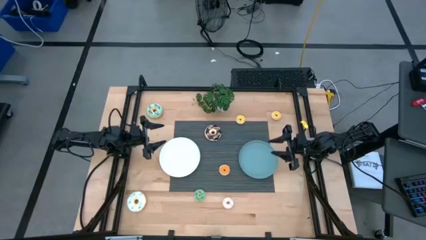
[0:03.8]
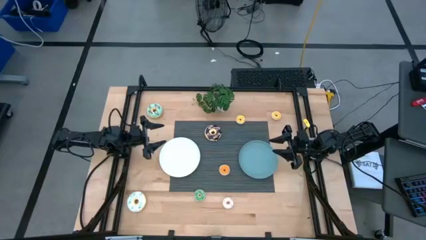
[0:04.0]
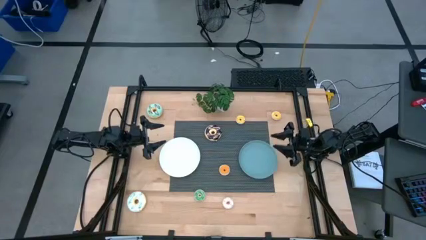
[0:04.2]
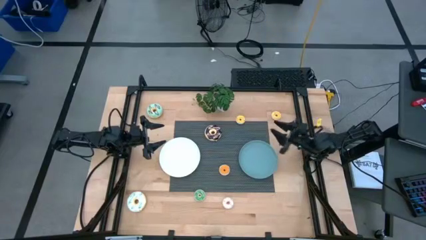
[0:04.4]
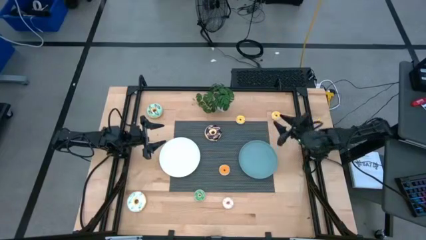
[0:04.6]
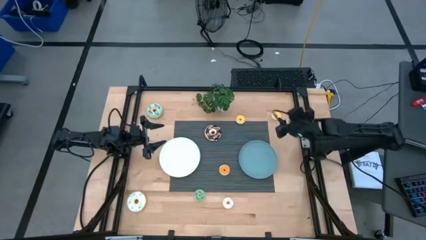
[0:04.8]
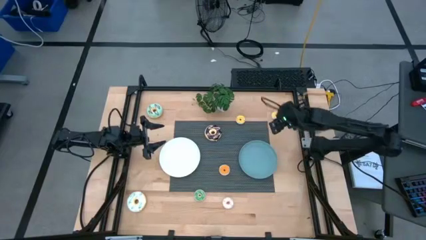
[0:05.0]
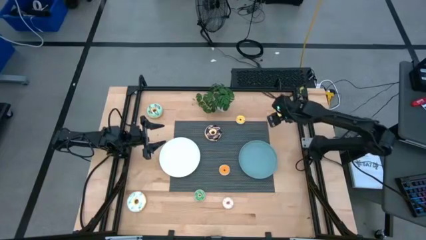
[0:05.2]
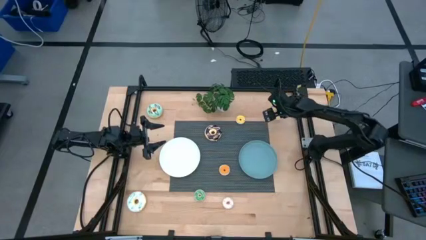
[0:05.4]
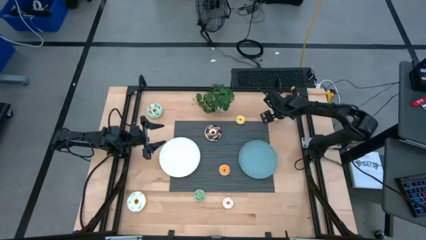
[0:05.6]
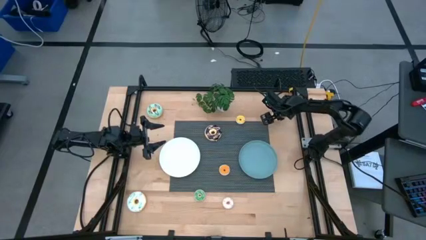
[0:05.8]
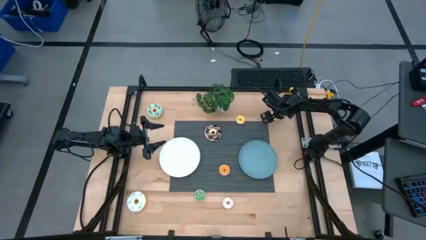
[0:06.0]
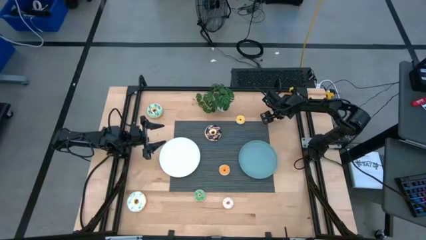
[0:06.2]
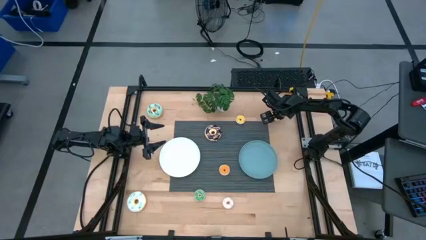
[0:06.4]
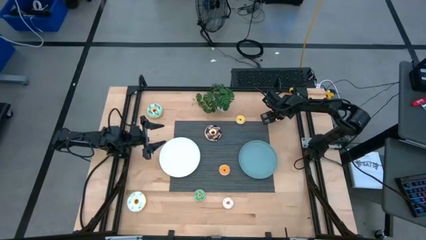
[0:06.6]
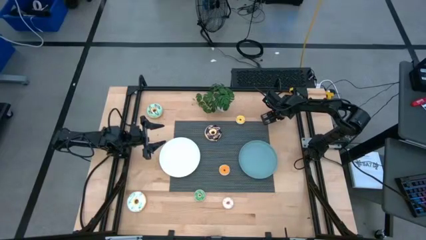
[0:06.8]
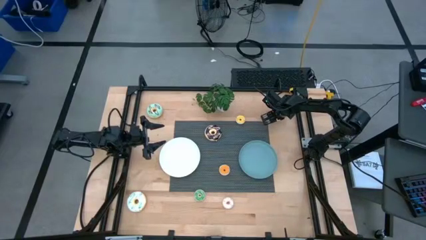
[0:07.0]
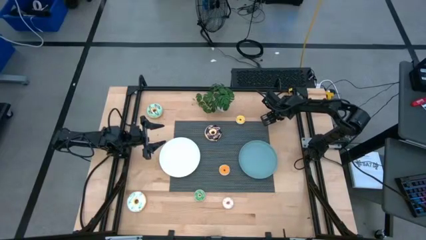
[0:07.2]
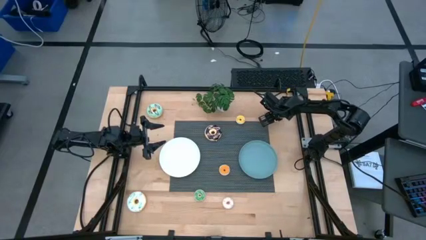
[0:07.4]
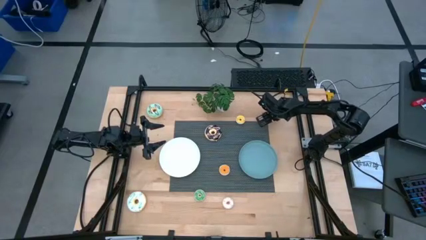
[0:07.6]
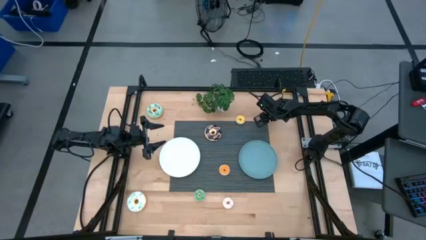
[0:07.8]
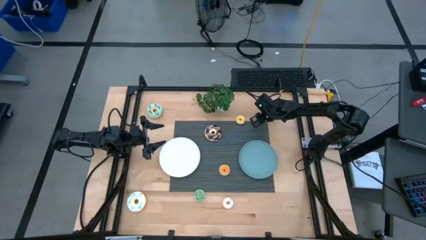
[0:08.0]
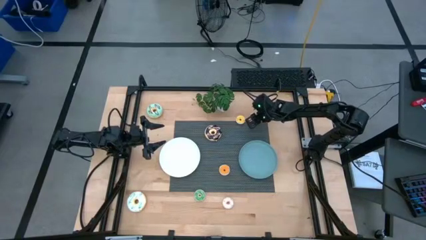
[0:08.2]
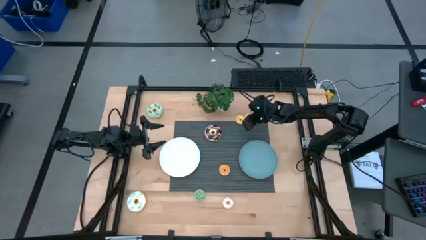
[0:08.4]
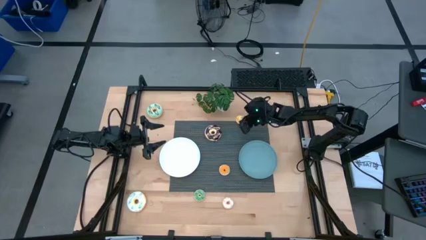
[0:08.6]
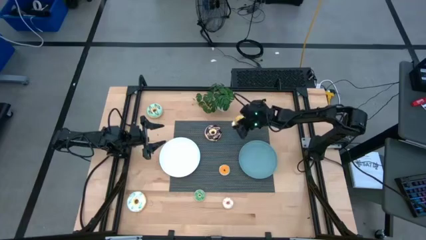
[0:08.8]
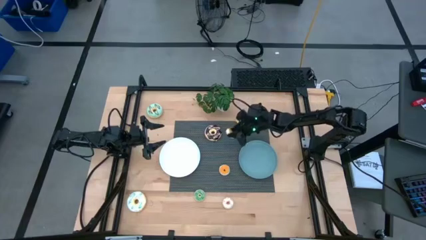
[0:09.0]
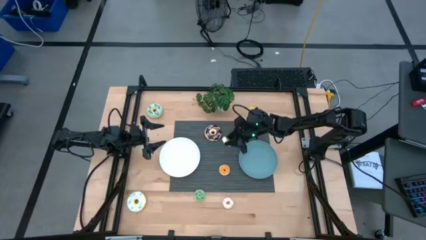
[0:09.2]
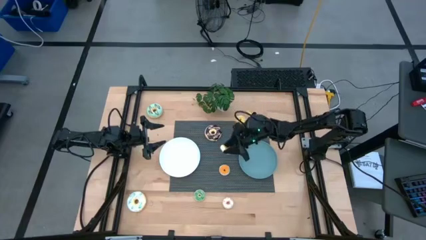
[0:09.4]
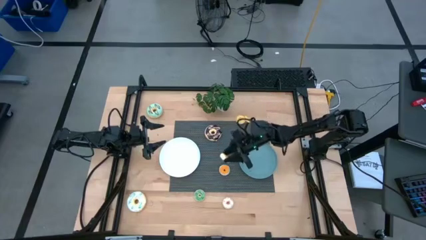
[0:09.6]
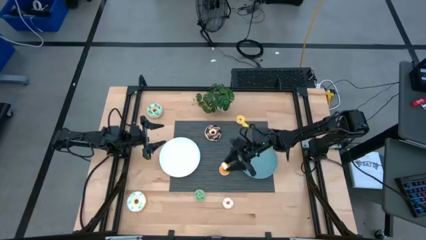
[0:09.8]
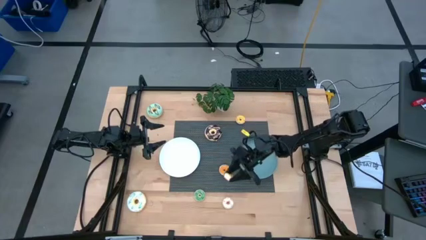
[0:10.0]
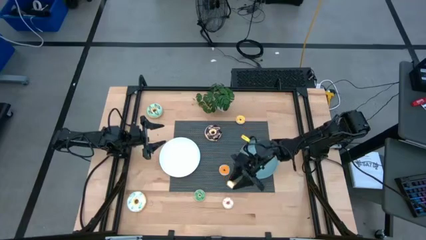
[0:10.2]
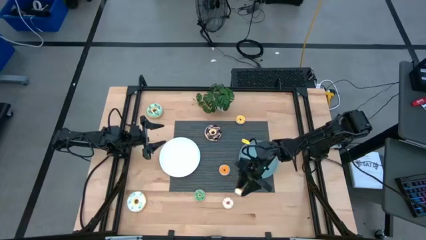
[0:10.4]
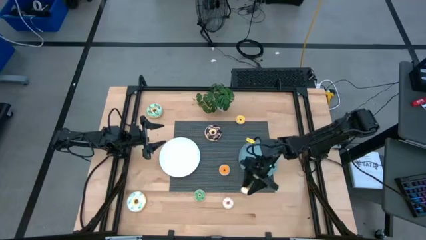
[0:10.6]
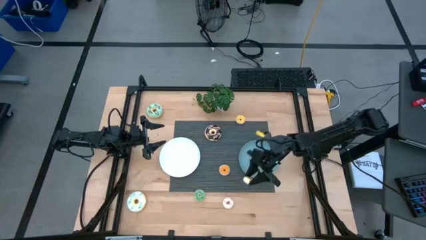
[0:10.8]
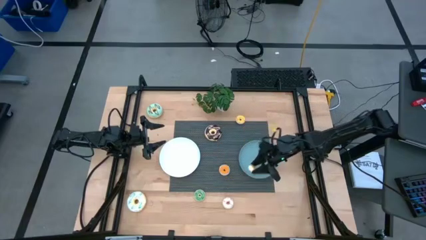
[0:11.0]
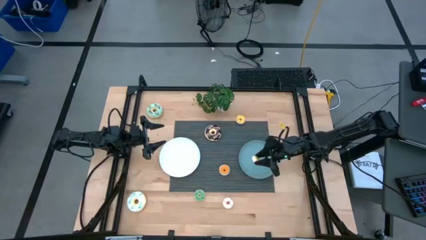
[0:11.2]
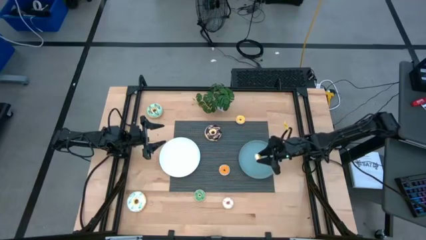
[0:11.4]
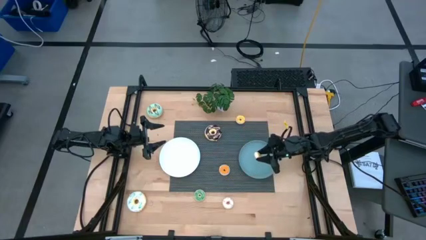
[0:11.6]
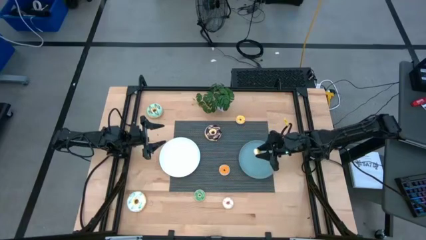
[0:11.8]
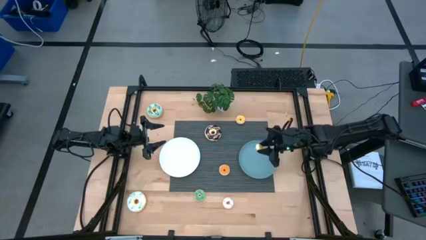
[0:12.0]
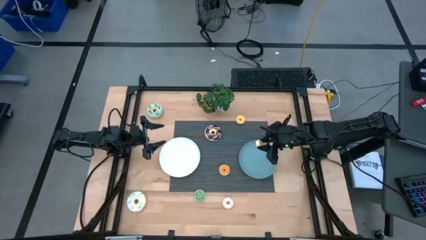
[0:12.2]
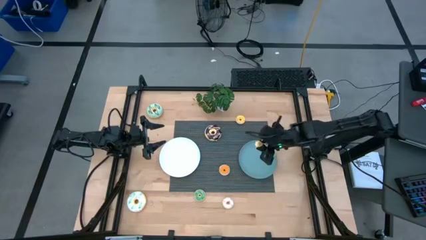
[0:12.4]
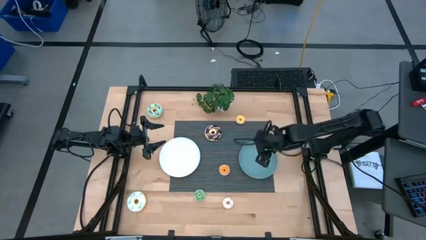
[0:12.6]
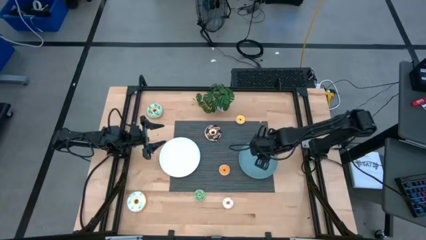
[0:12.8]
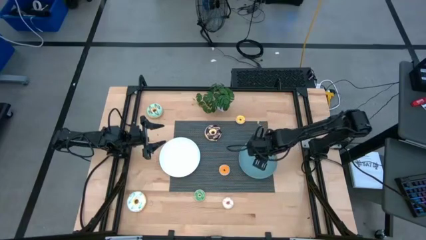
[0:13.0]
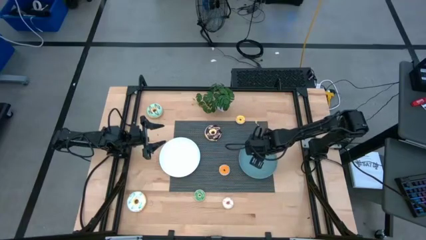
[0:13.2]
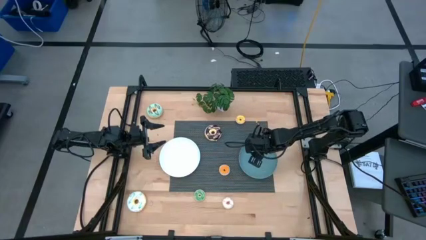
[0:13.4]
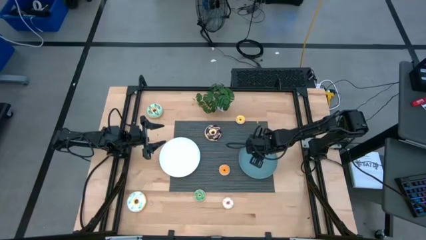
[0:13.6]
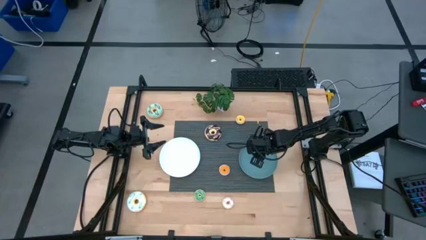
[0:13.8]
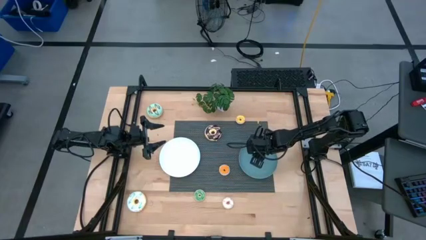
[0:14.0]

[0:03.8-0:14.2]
Task: Pick & Place donuts
Put the top small yellow doughnut on top of the blue plate
